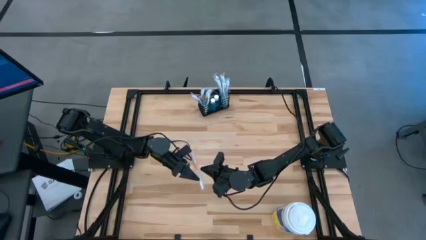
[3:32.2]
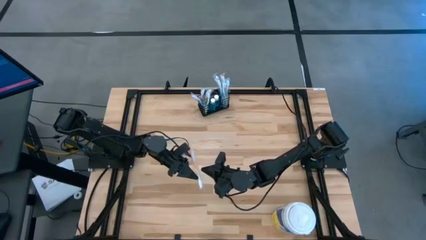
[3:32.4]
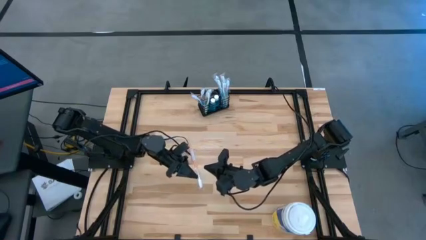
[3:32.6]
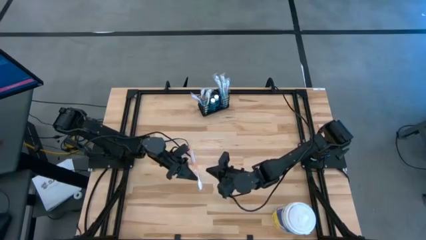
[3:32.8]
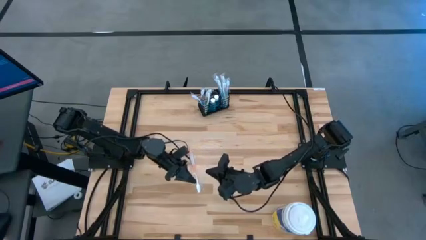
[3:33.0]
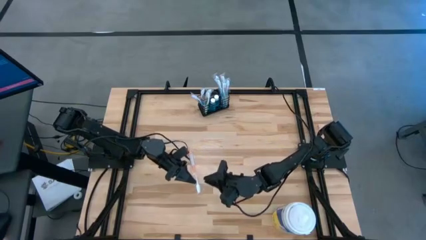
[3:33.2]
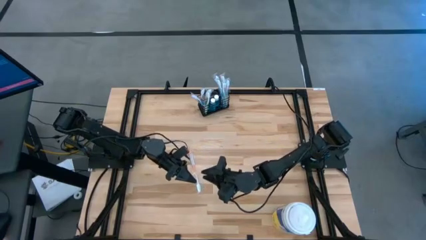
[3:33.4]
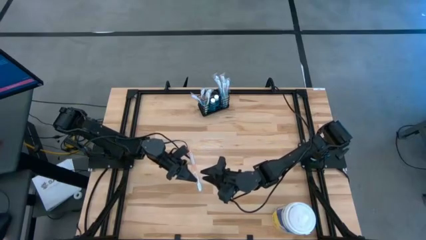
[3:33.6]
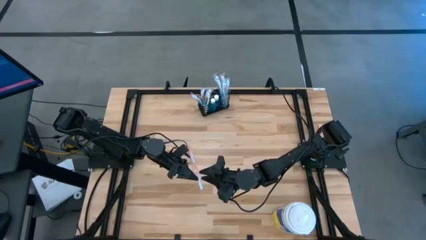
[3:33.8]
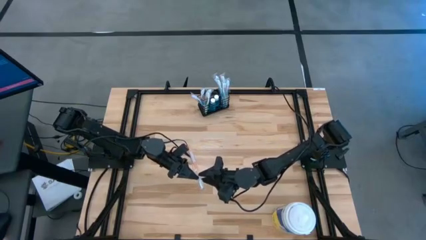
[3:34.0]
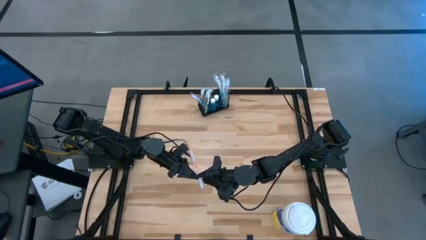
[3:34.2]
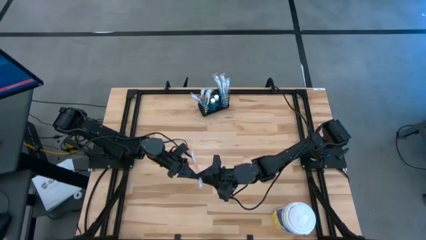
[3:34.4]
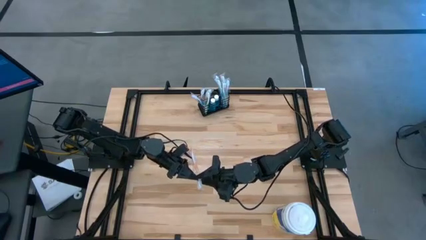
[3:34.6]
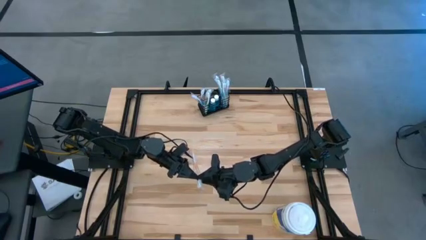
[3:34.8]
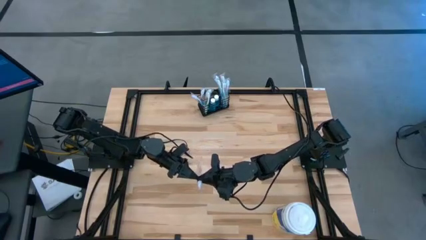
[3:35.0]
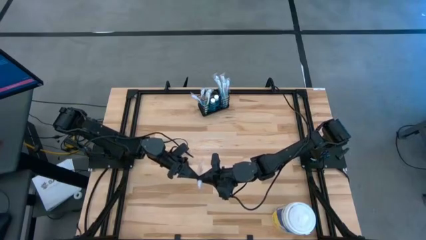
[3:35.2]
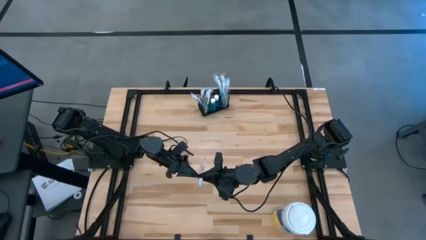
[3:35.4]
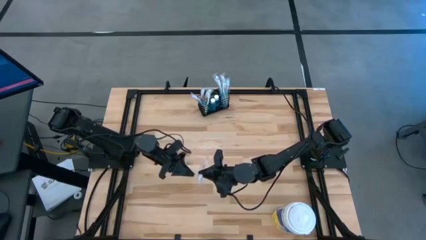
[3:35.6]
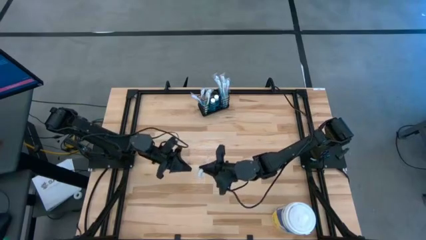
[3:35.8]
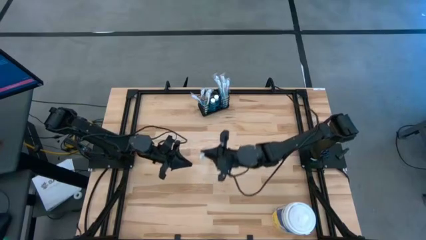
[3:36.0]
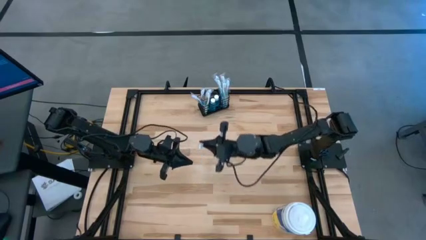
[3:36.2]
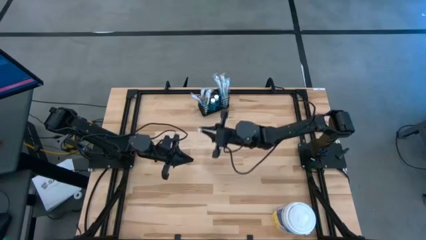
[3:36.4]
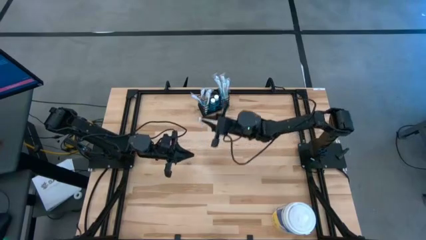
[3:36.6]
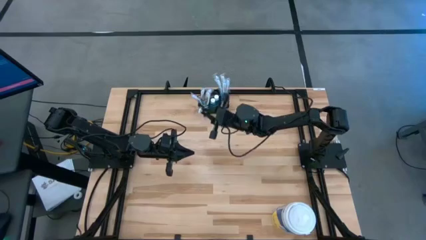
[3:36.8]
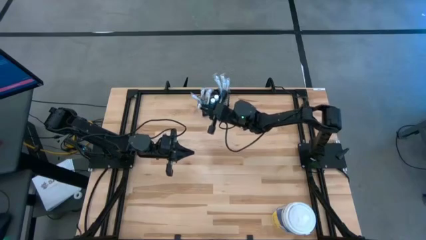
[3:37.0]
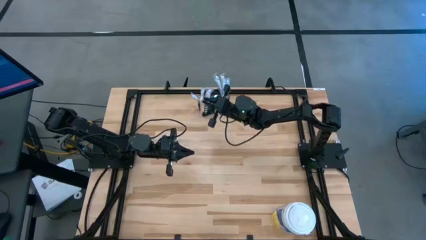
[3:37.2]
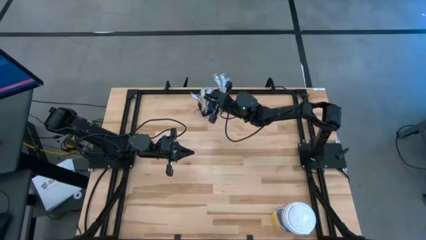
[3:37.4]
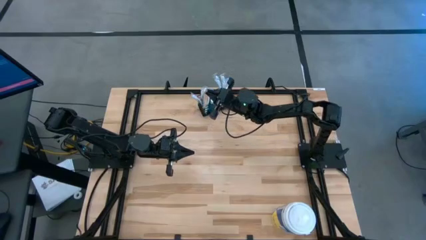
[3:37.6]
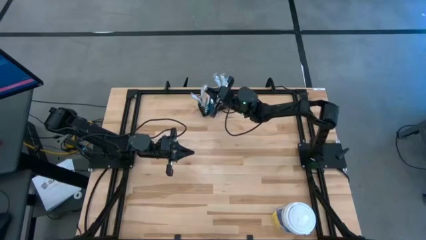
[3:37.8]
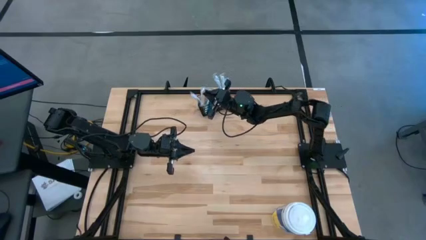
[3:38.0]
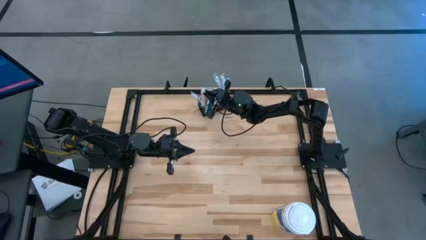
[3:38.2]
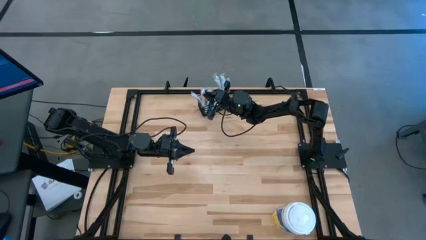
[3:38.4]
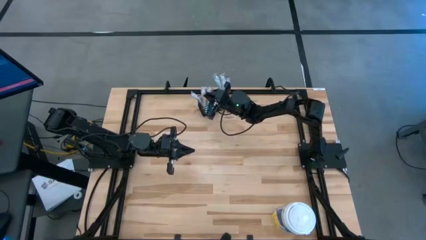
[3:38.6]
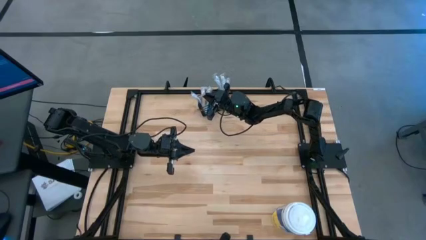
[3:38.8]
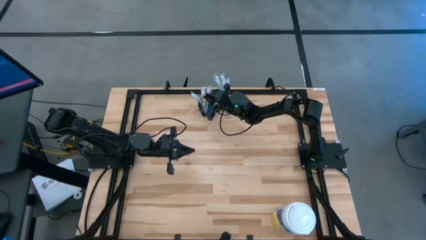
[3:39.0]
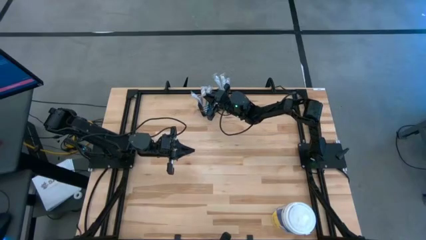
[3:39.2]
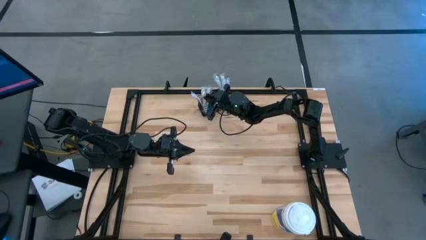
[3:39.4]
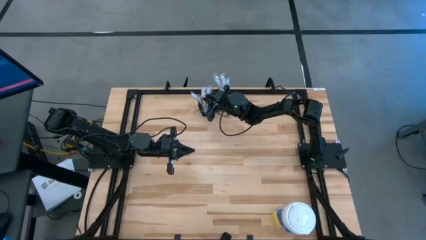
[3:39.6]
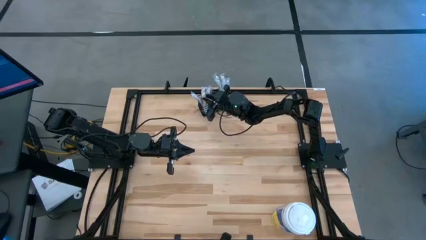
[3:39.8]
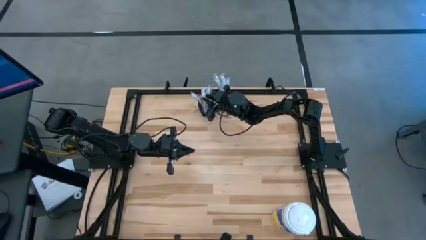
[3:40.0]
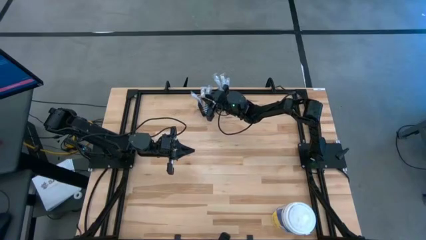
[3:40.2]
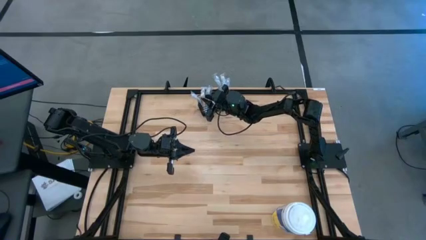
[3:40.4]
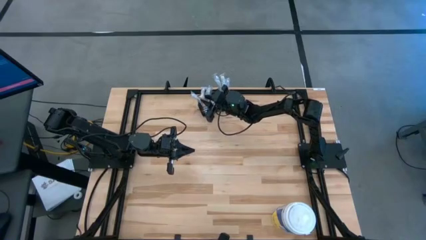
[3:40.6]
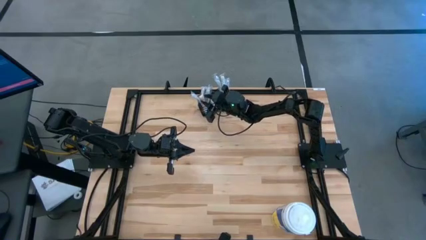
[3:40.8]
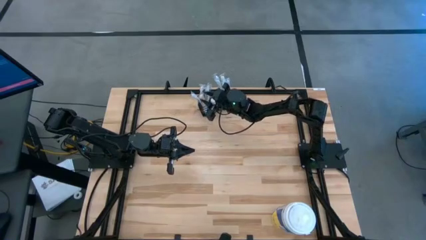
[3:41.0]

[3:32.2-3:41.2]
Task: Pick & Place toothbrushing station
Put the orange toothbrush into the black wire organizer

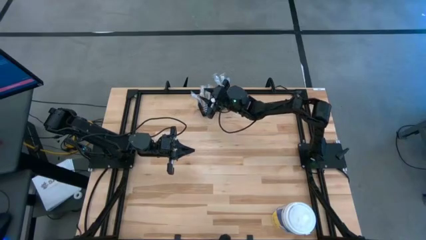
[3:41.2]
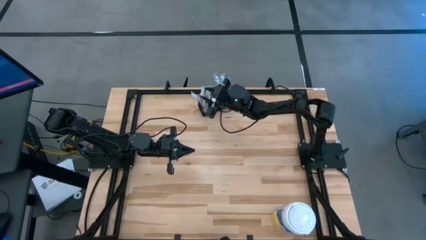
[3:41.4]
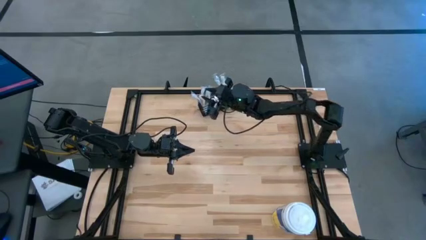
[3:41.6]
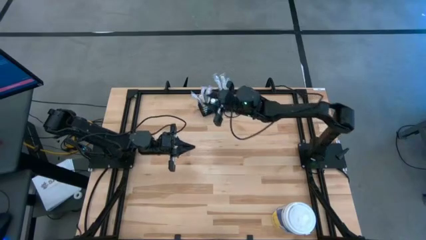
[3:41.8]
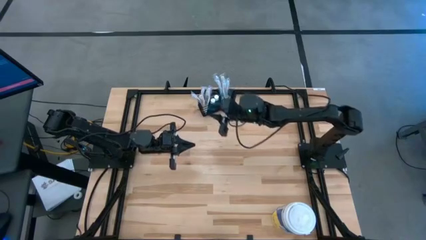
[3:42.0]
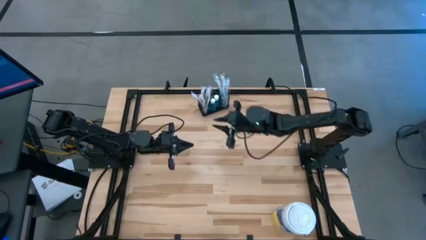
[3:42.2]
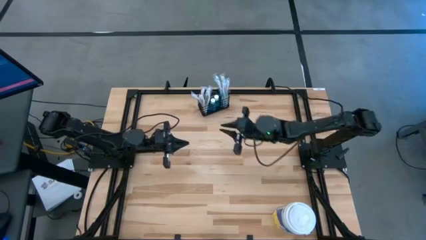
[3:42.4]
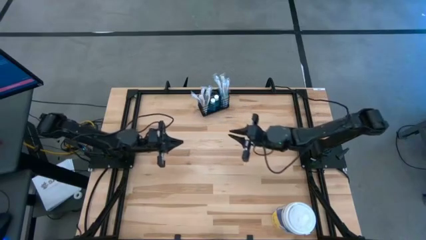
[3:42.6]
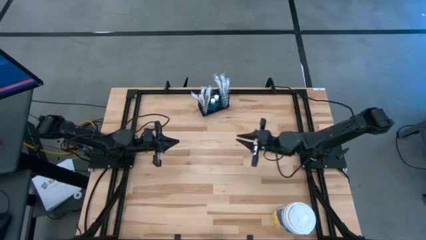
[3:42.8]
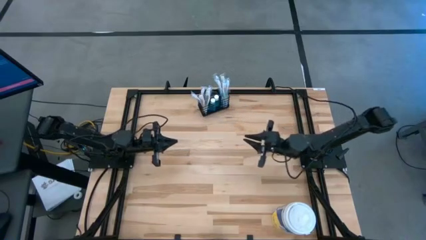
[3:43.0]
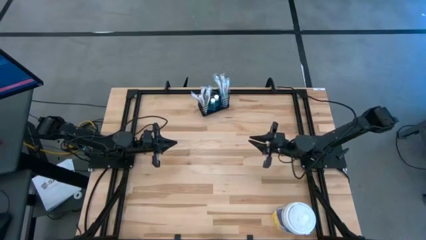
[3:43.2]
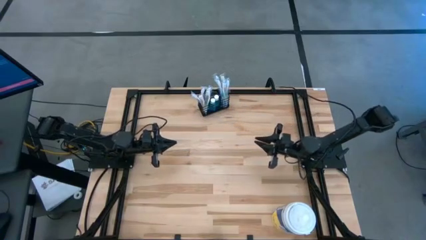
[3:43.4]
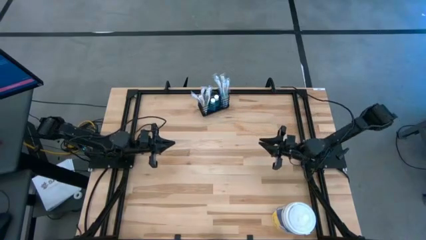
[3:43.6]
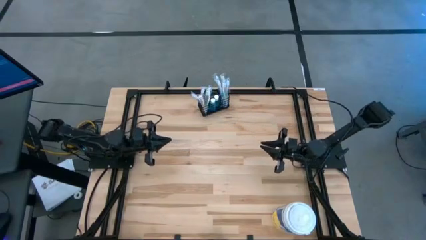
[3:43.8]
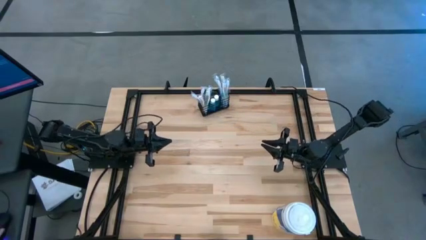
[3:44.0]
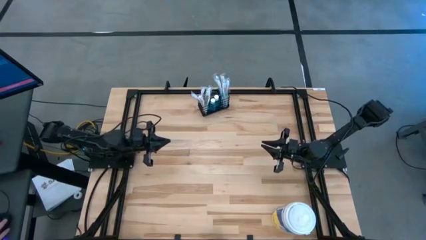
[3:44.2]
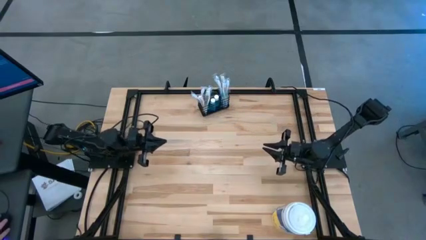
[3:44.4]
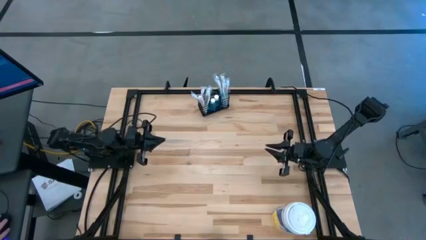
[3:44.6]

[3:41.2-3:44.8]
Return to Home Position

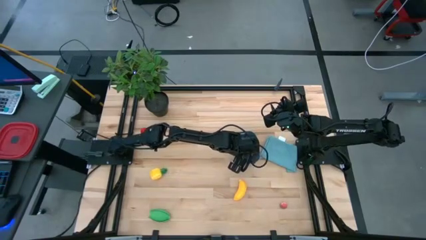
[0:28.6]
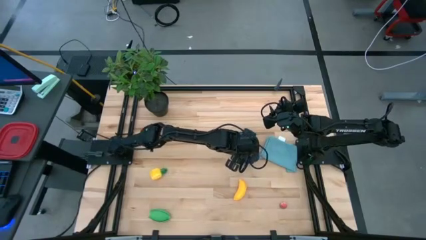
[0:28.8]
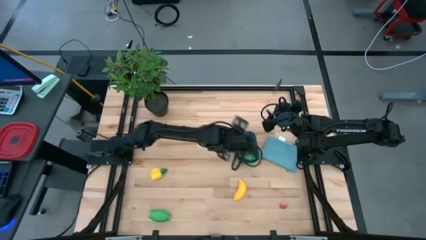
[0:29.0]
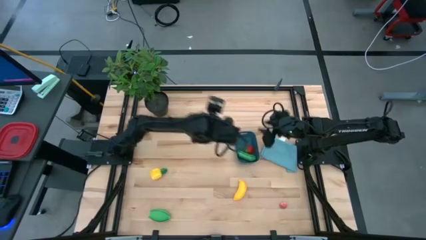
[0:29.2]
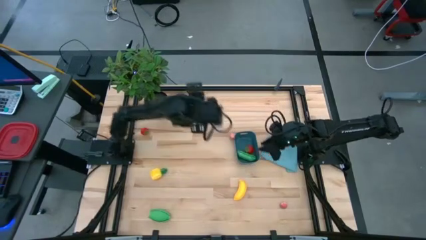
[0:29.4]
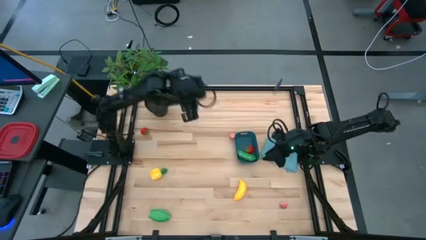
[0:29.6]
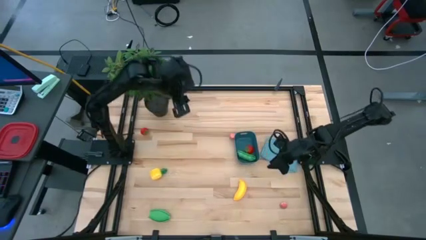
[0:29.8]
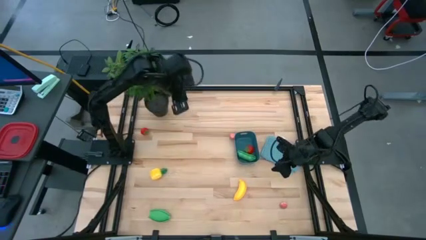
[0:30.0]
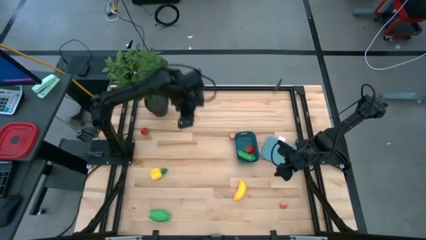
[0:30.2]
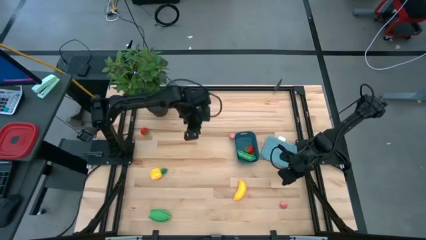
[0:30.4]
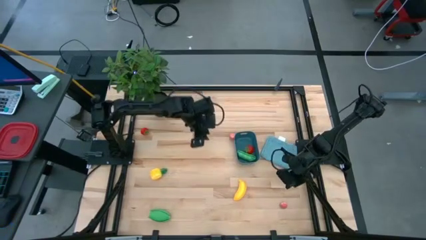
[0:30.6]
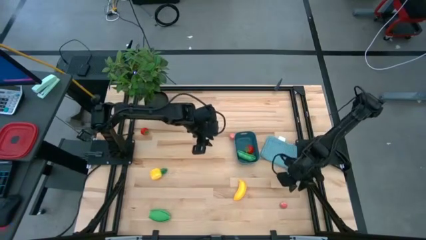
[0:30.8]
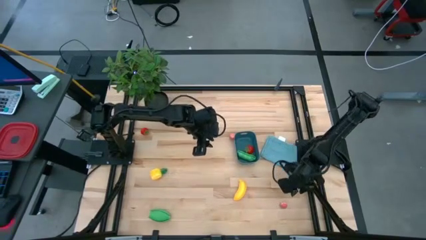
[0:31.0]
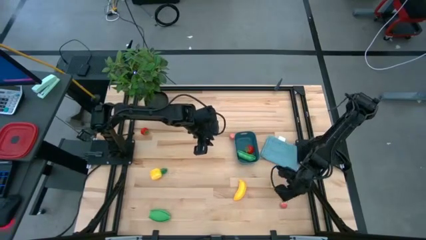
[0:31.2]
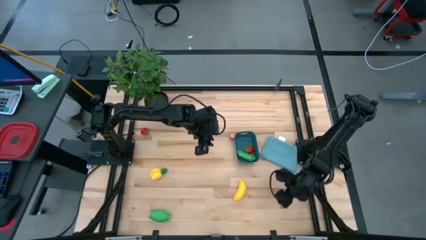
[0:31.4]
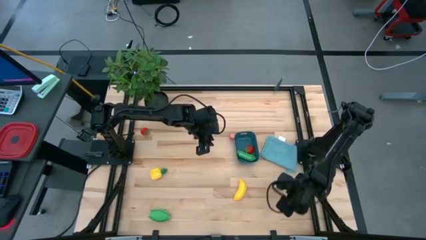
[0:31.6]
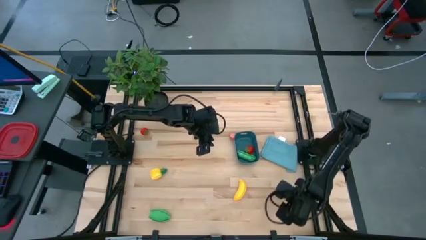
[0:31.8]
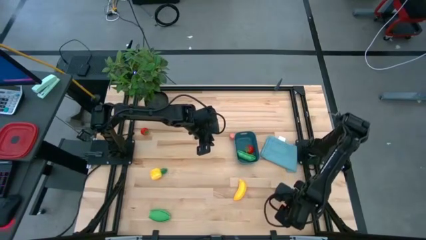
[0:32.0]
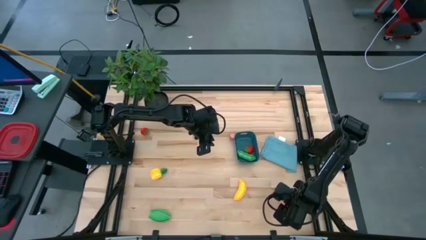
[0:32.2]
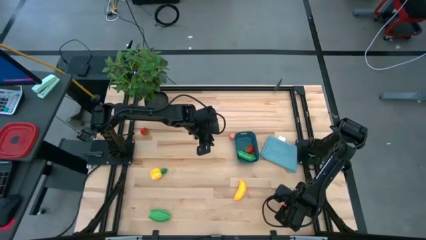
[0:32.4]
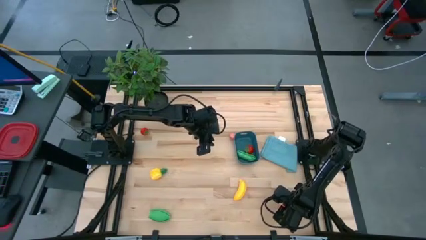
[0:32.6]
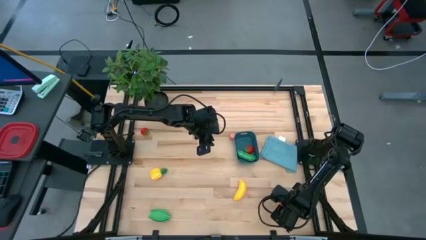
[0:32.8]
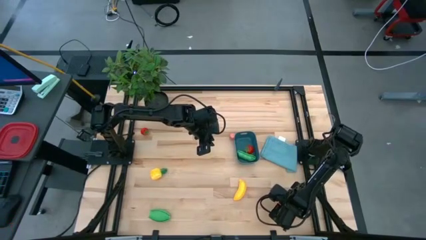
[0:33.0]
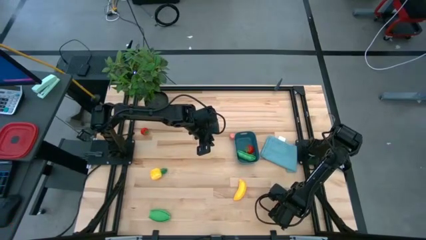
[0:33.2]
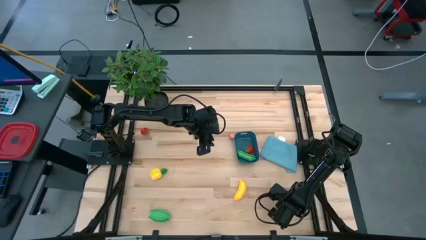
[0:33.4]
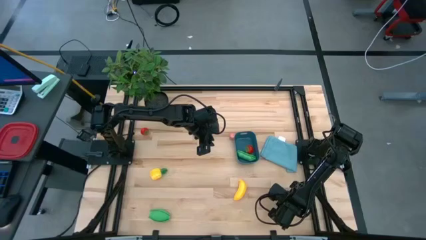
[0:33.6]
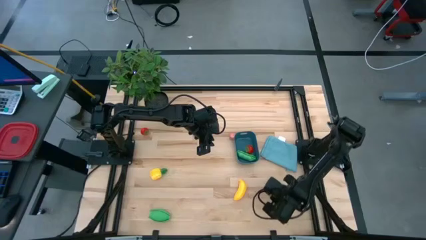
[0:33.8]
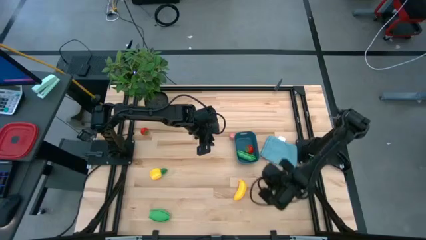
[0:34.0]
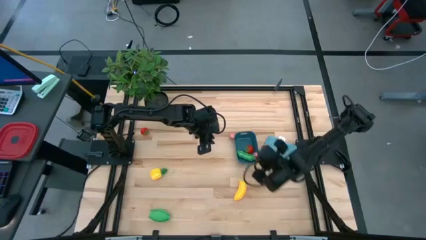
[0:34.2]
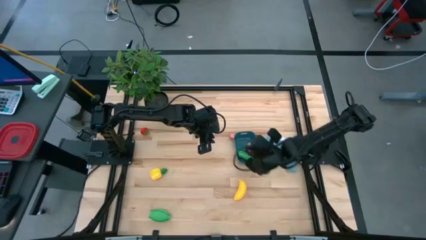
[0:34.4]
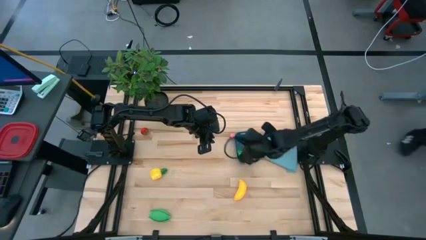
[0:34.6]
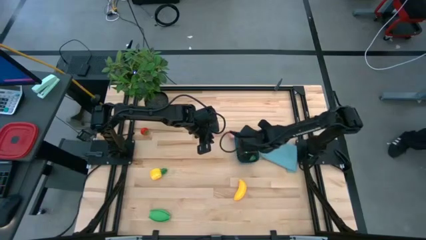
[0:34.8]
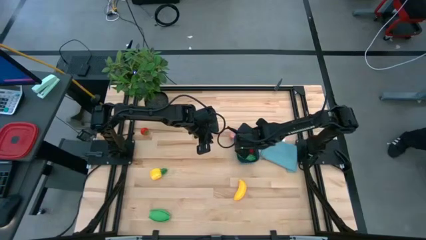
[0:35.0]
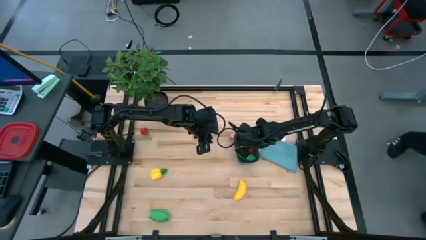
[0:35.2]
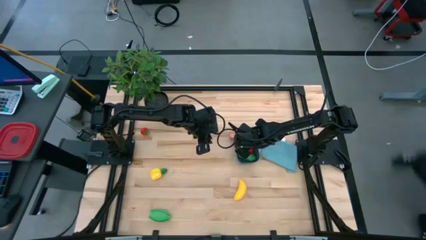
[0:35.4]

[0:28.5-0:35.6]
Task: Pick and placing Produce into tupperware
Put the bottom pink peach into the blue bin
